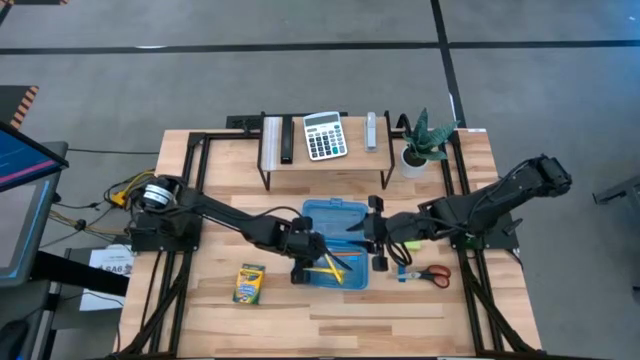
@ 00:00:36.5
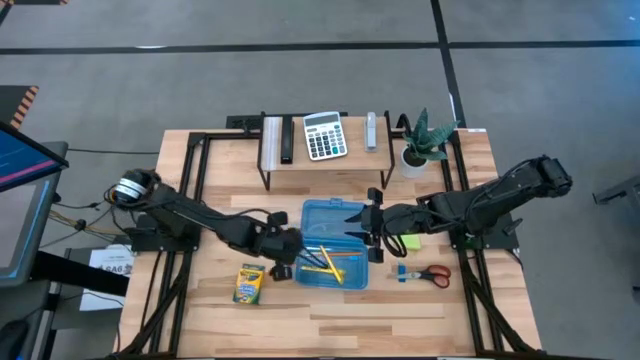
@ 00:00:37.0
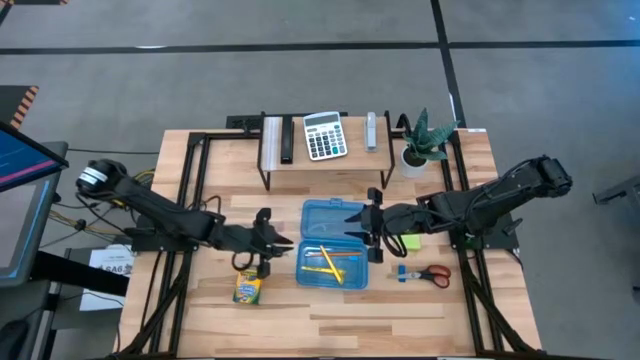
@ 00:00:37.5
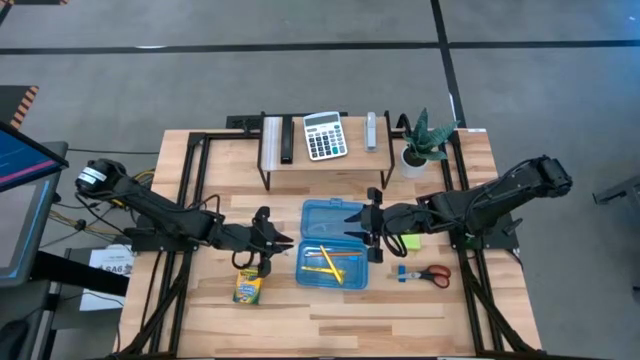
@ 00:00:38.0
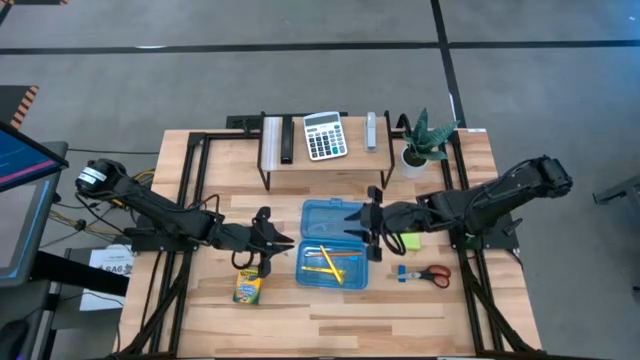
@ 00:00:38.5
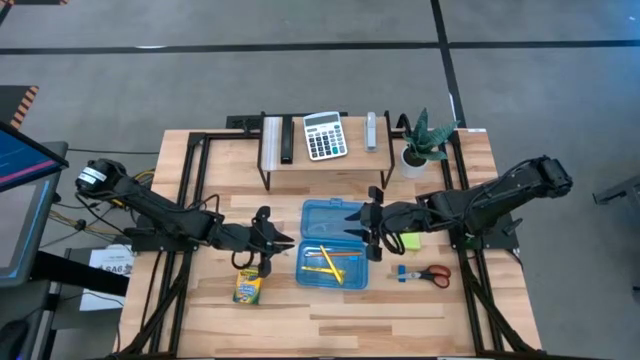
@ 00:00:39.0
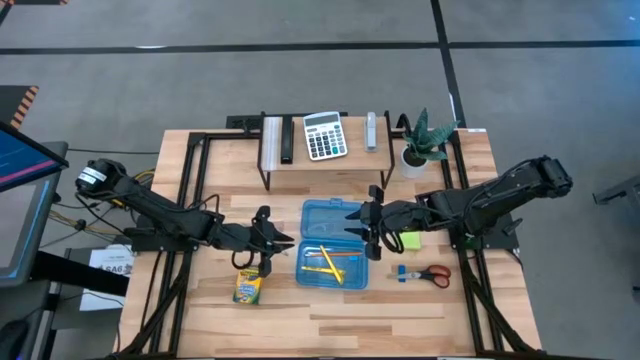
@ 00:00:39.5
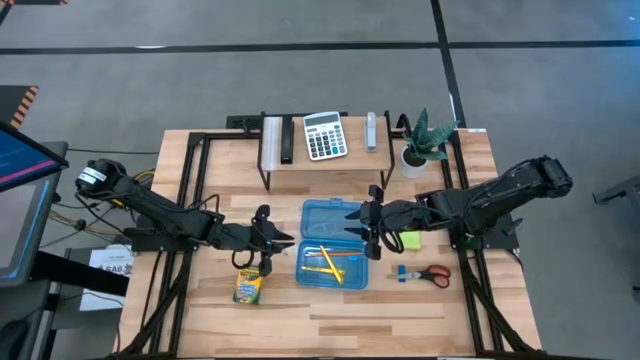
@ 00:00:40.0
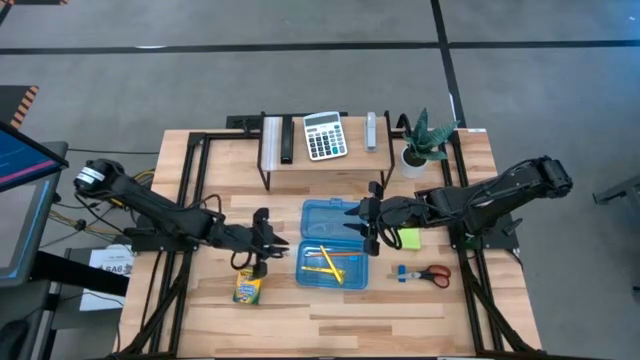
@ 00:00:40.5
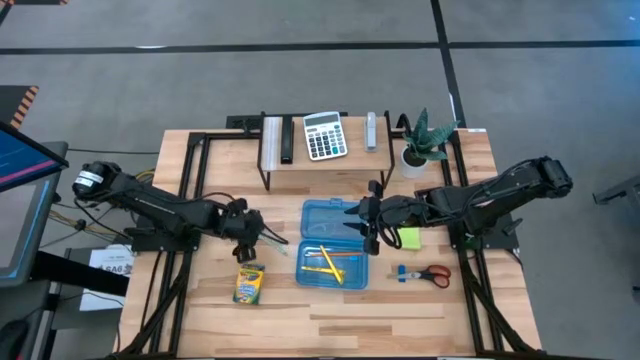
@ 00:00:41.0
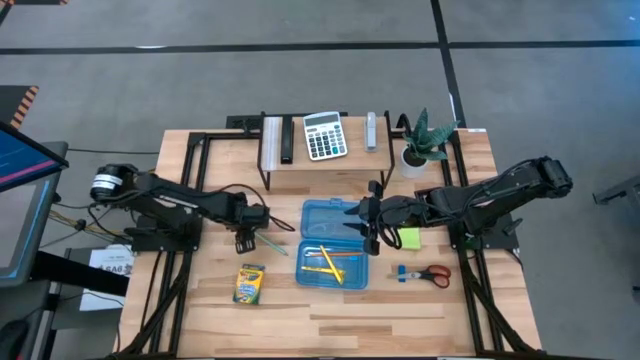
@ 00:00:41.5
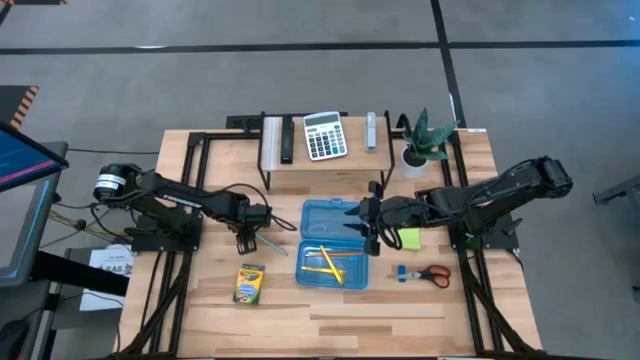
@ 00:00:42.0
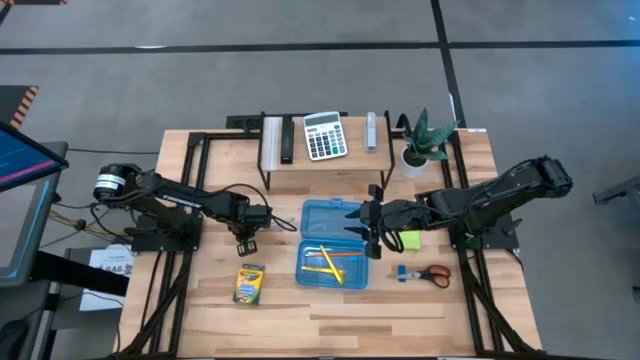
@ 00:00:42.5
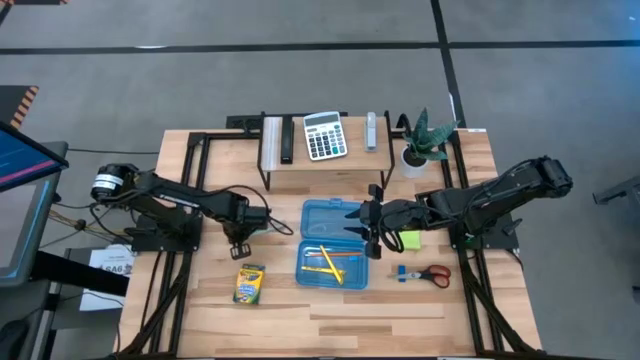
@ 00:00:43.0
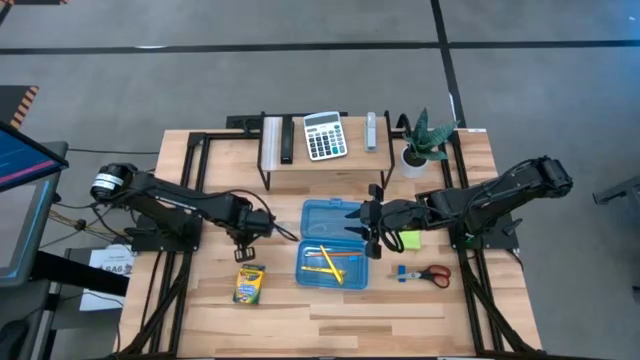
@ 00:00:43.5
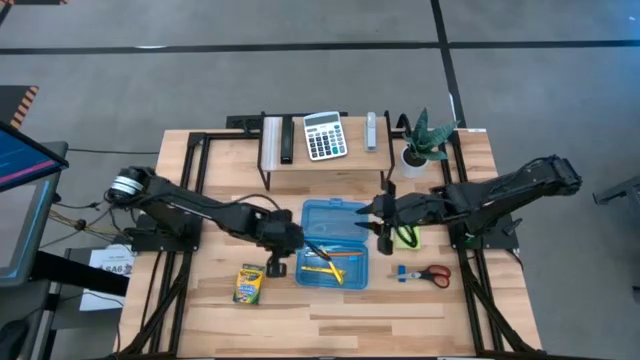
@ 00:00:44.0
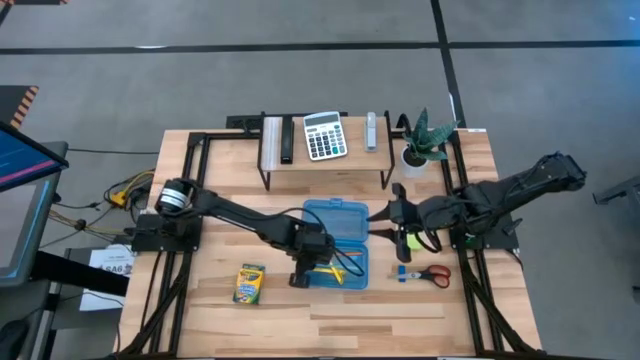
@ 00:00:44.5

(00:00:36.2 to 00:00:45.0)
Task: Pack school essentials
Put the light blue pencil into the supply box

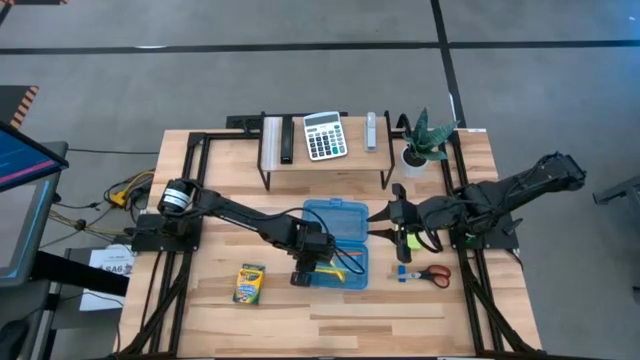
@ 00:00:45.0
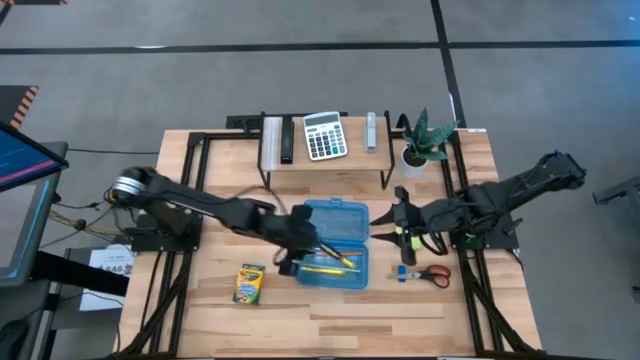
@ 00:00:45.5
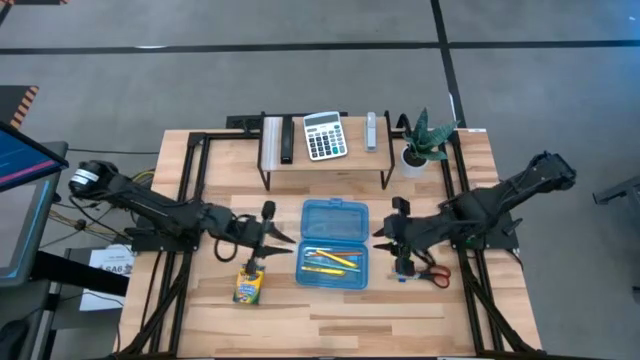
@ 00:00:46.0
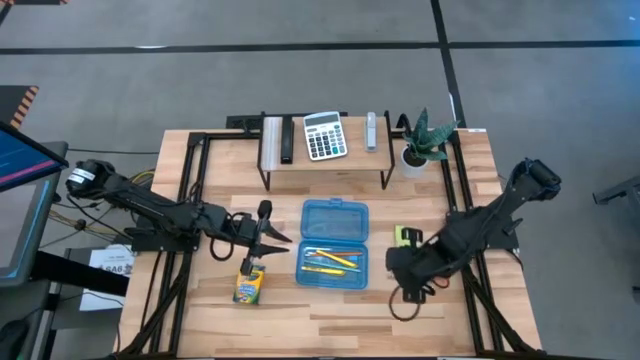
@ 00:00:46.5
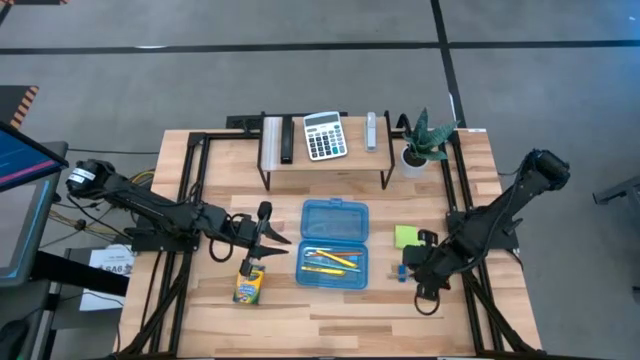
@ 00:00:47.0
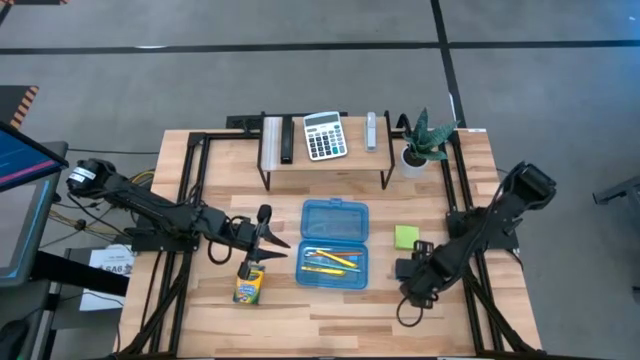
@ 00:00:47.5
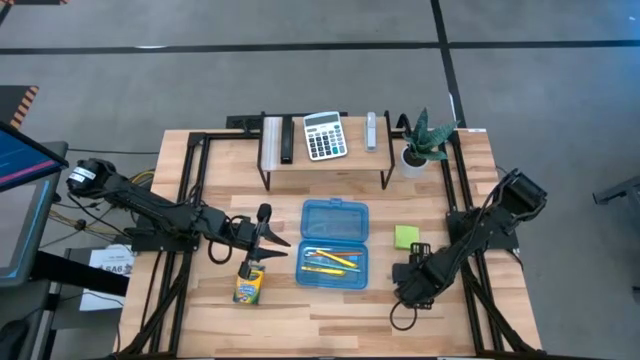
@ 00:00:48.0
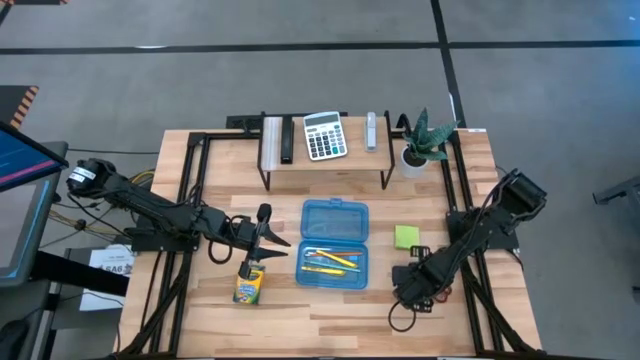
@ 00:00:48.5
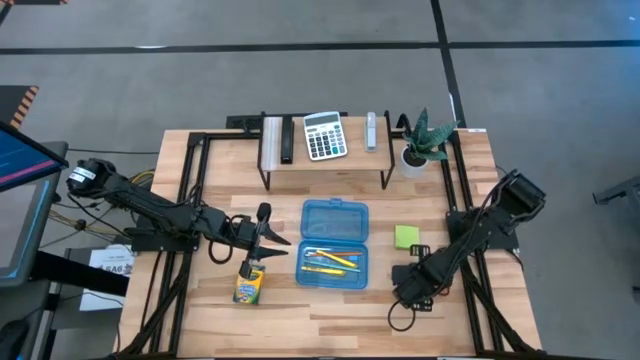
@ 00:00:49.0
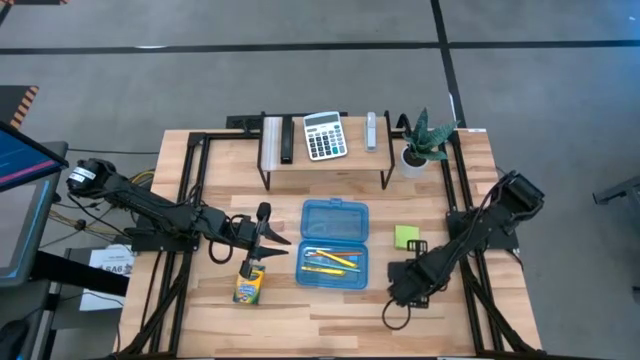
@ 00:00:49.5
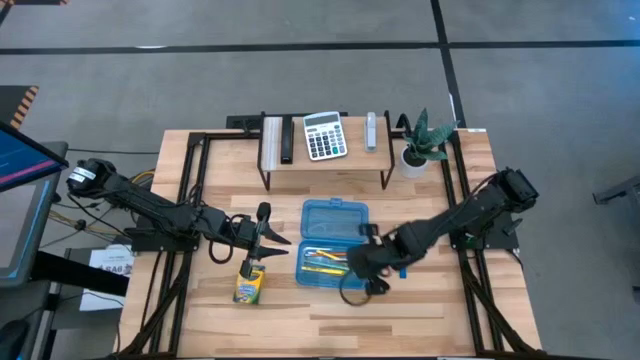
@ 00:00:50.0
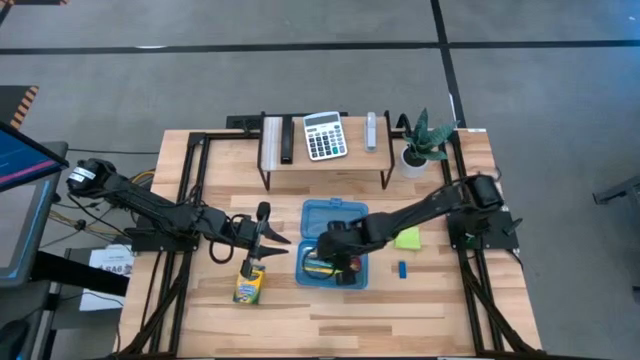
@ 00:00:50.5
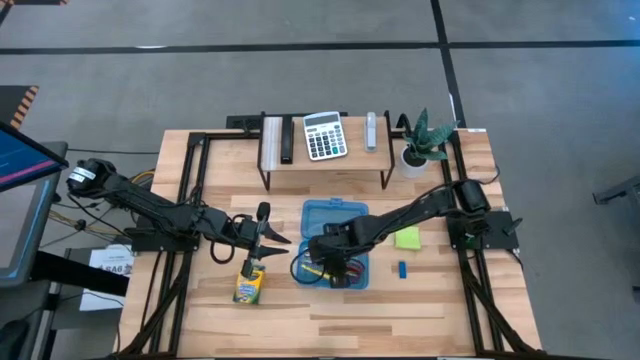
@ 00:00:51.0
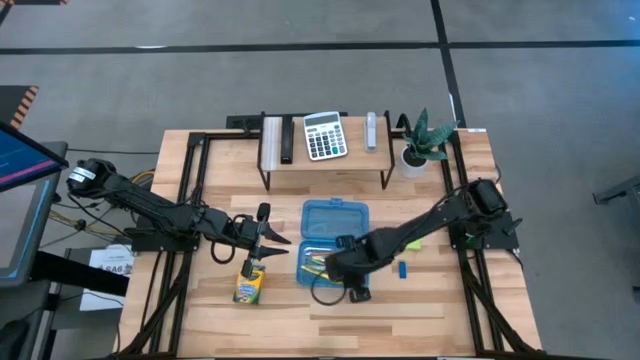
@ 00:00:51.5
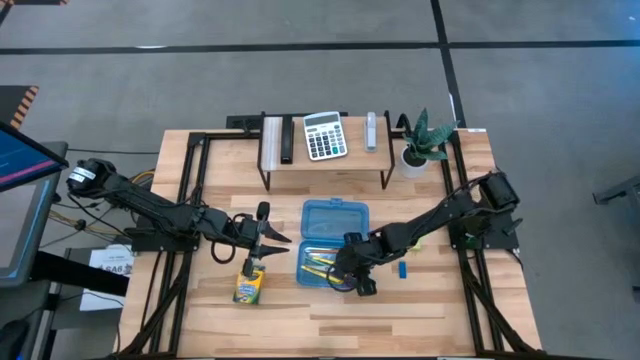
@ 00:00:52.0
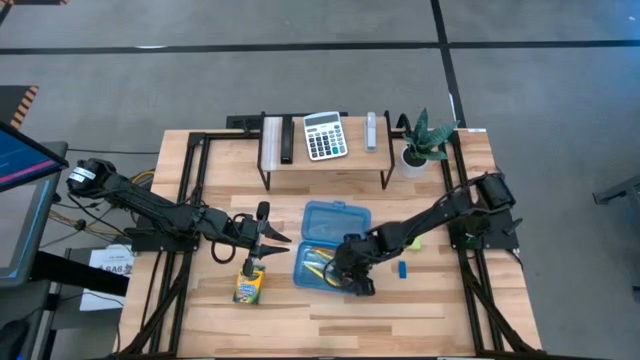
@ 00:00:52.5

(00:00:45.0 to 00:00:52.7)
Put the black scissor into the supply box

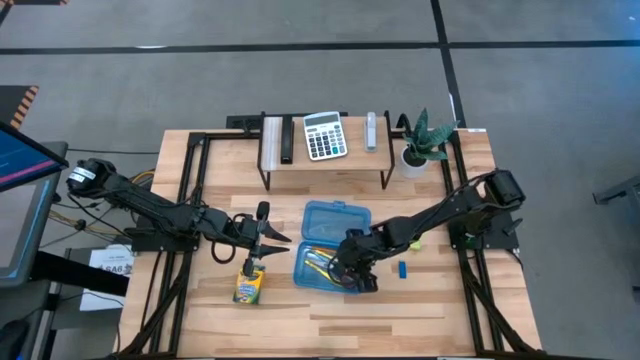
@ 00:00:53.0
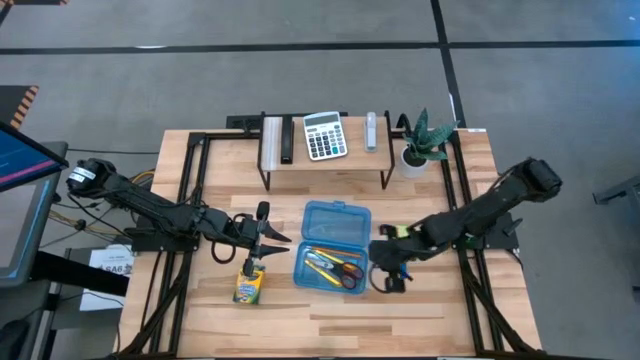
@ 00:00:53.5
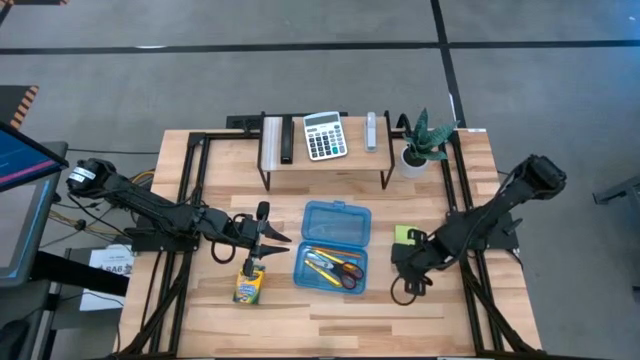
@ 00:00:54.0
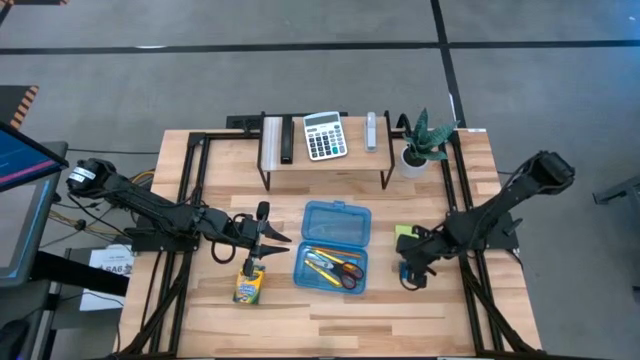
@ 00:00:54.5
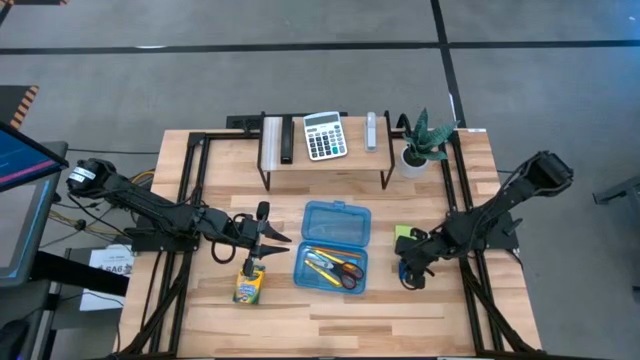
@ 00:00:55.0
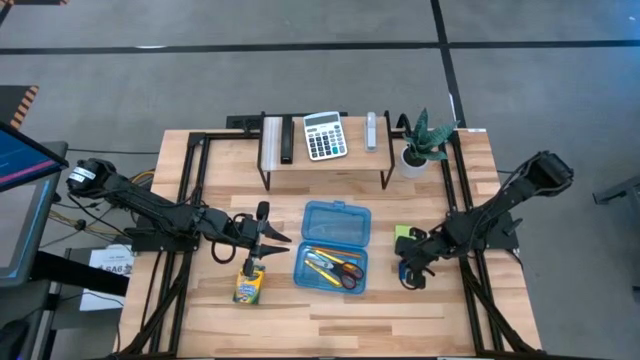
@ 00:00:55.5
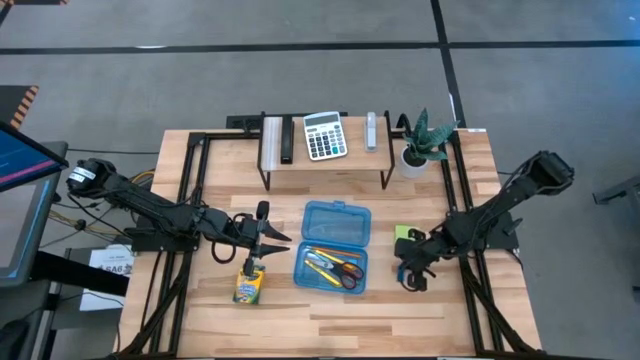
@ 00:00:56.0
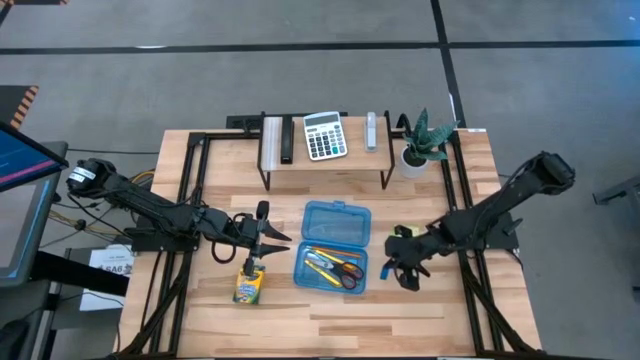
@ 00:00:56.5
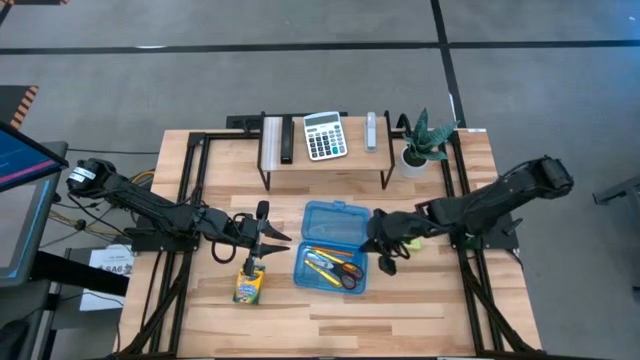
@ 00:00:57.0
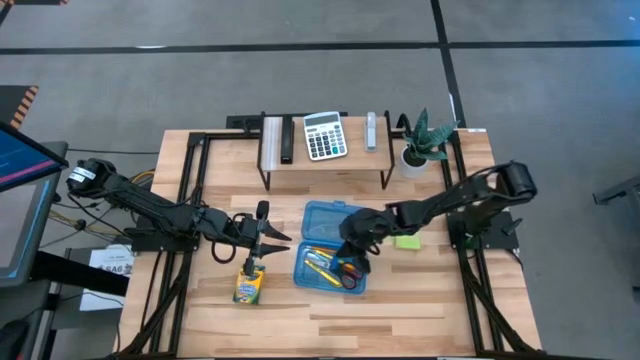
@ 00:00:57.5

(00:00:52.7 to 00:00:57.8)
Put the blue eraser into the supply box
